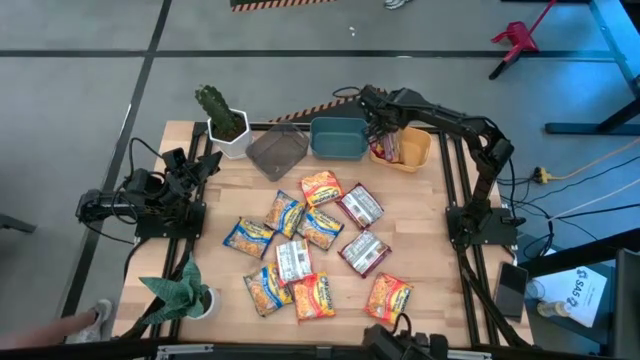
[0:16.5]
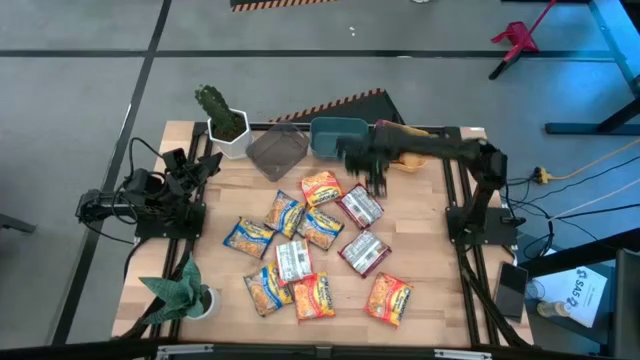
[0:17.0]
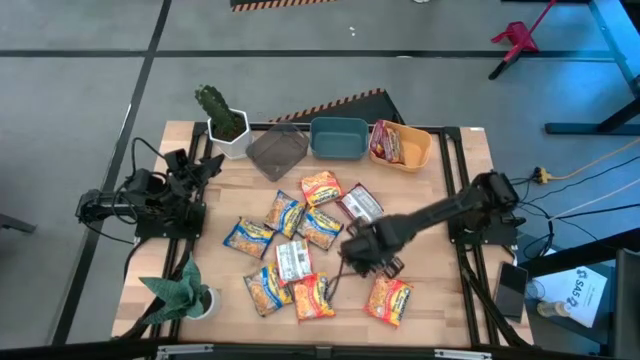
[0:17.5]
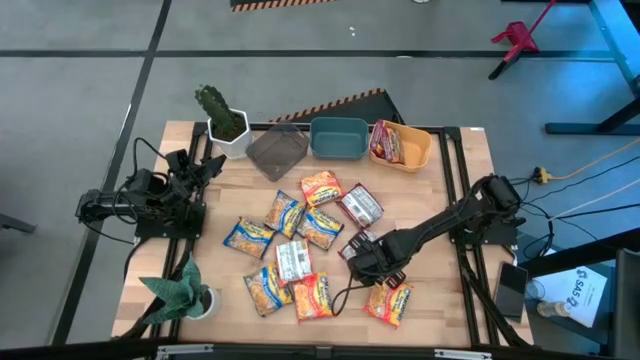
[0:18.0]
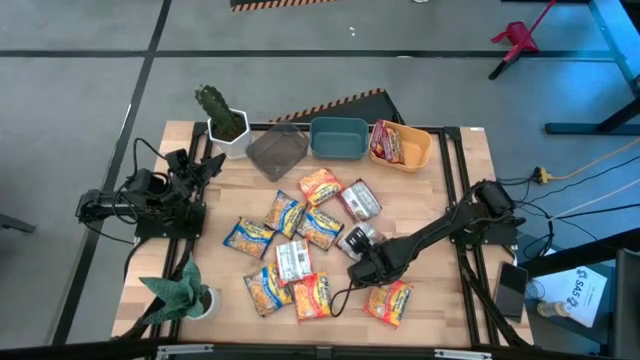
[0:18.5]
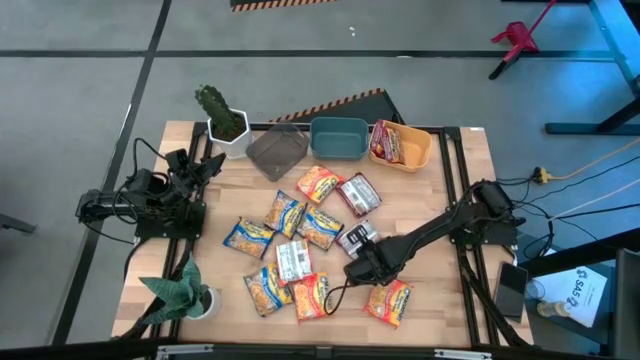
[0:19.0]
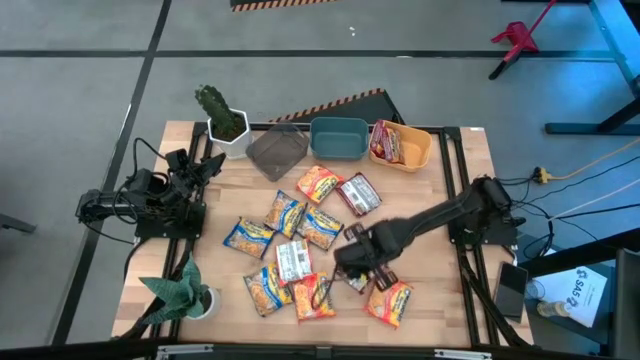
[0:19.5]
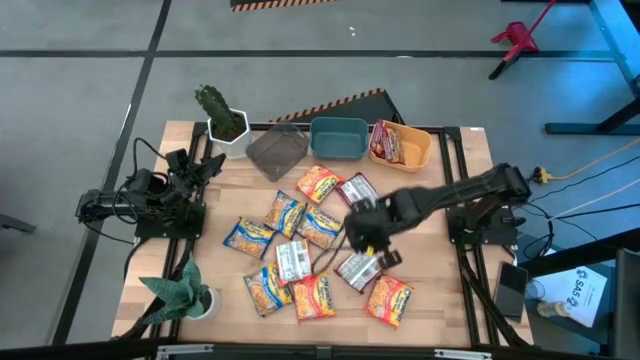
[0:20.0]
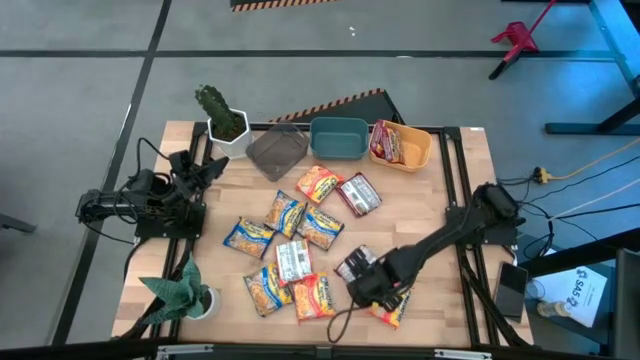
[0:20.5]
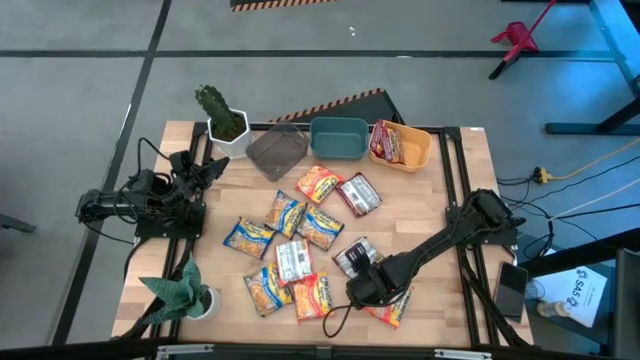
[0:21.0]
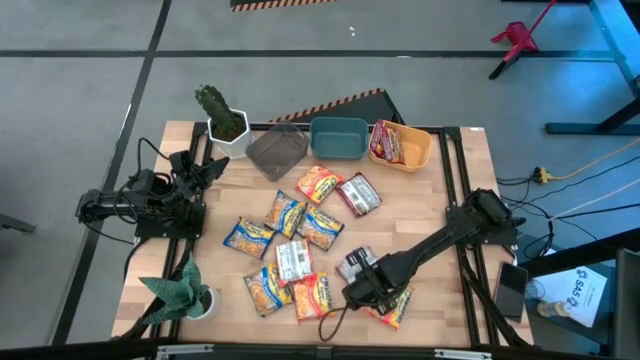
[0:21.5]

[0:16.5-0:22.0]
Task: Sort Maruchan noodles
Put the bottom red noodle pack into the orange bin

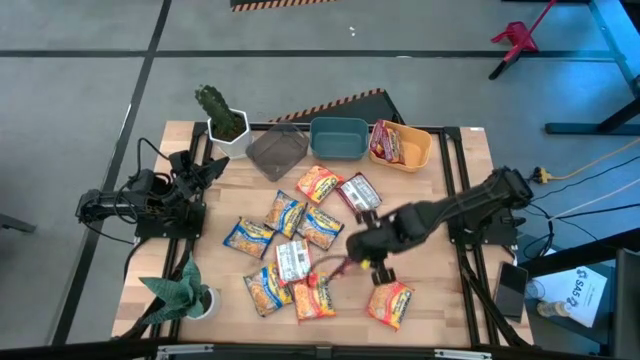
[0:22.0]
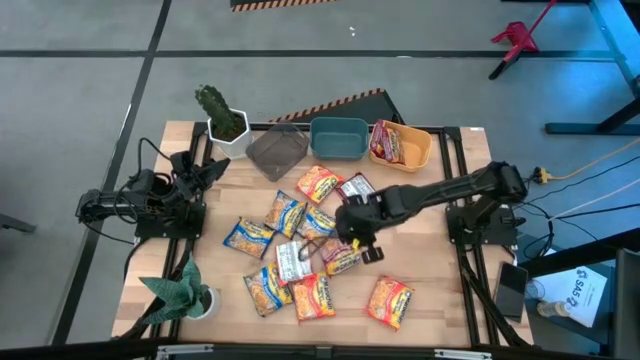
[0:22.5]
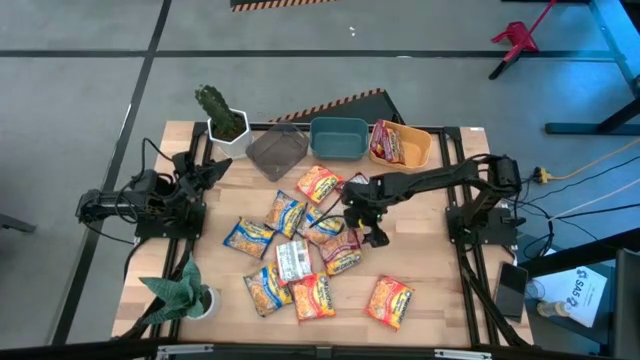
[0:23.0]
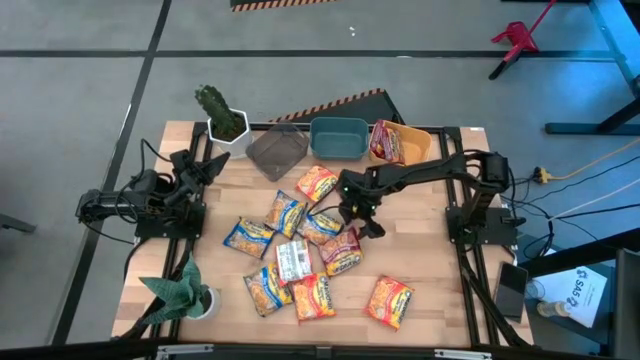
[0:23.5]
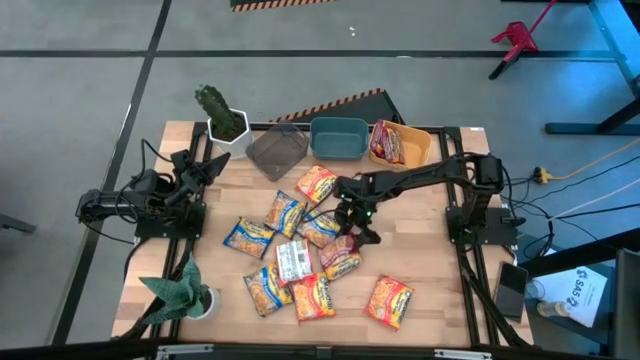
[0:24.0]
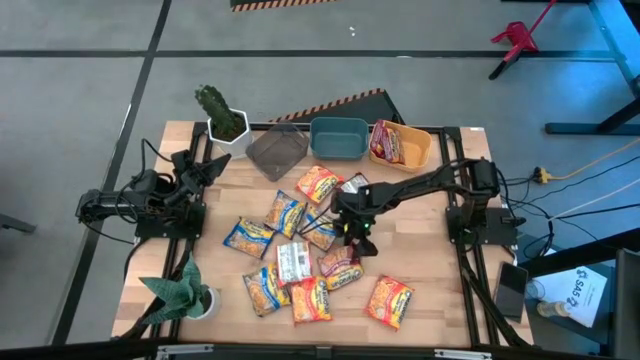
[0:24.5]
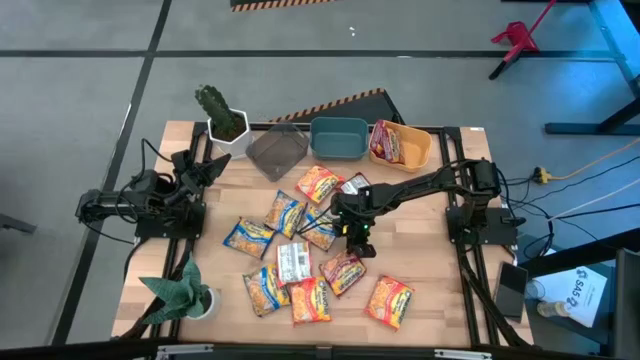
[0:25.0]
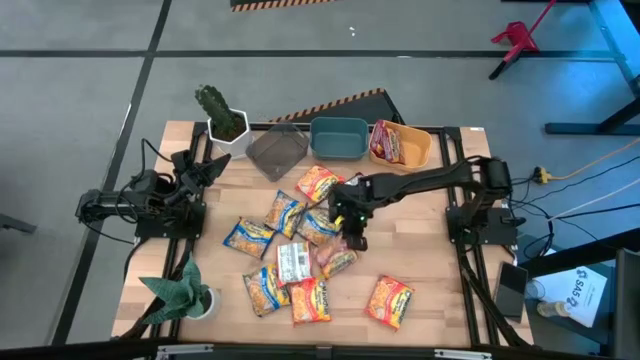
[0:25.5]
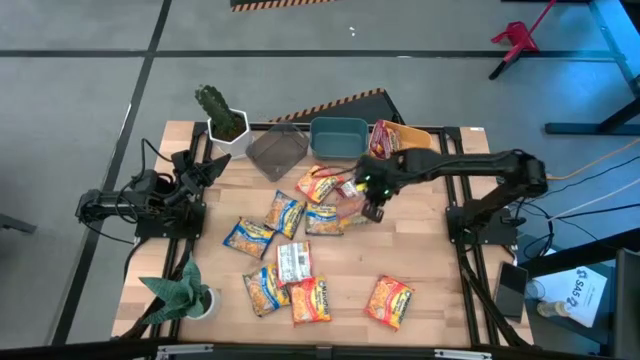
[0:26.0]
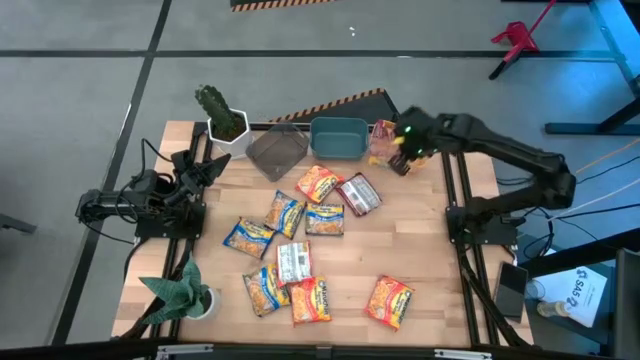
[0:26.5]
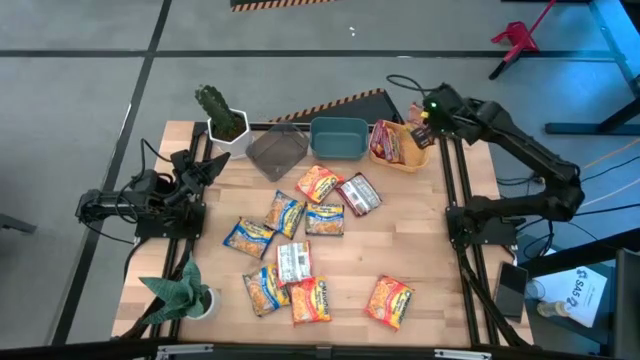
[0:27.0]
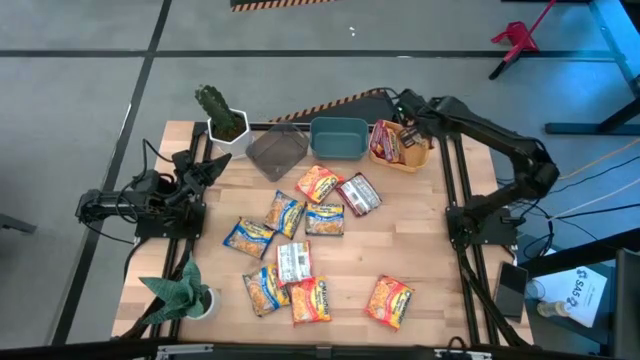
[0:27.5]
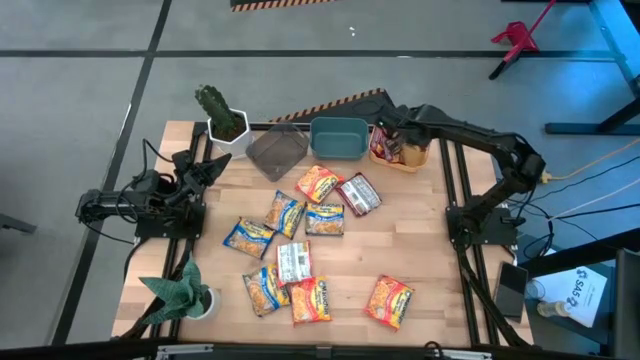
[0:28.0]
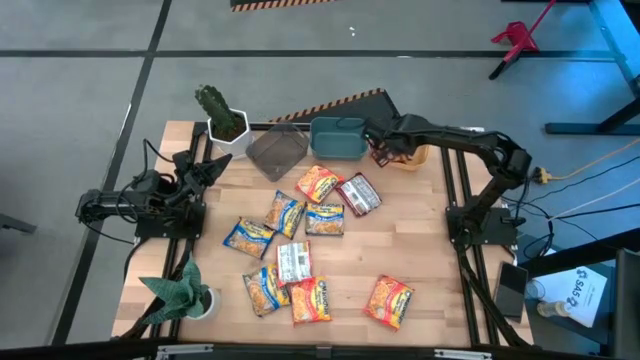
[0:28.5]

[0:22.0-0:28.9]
Put the bottom red noodle pack into the orange bin

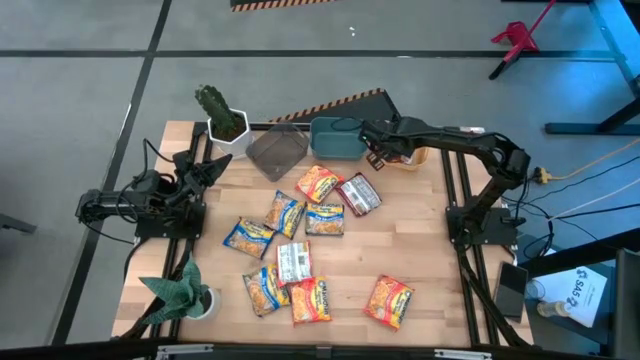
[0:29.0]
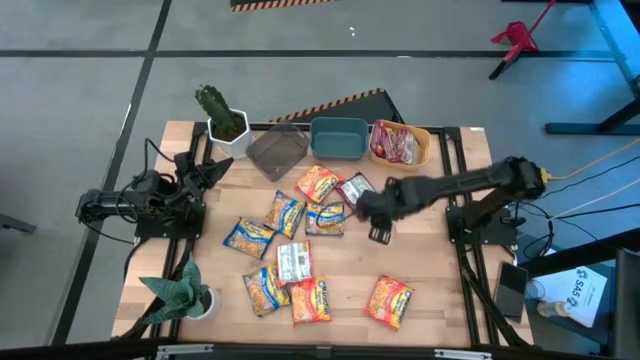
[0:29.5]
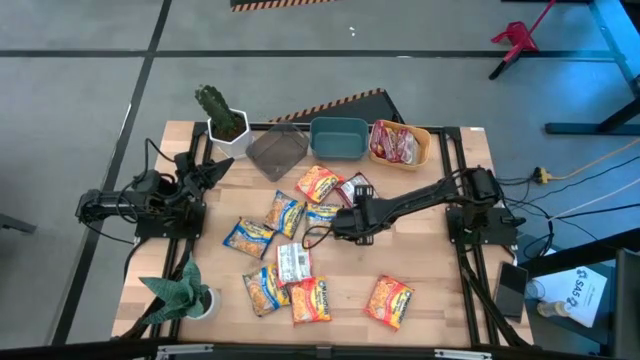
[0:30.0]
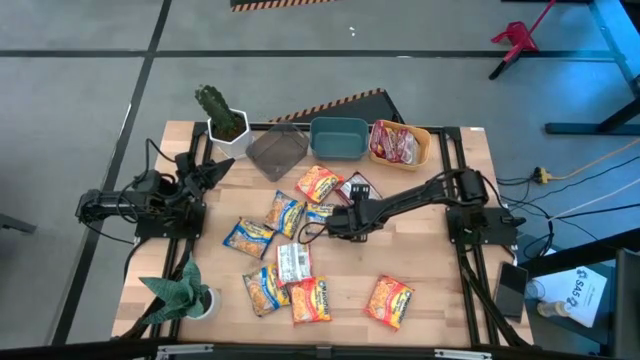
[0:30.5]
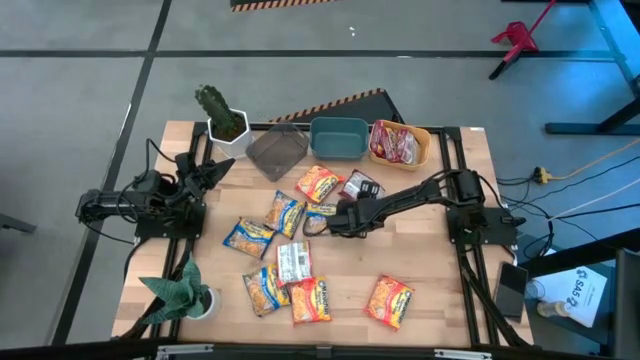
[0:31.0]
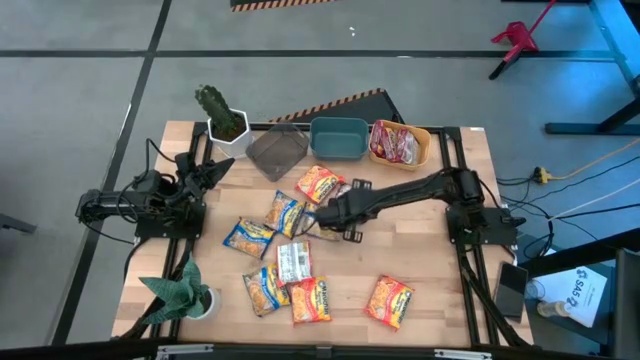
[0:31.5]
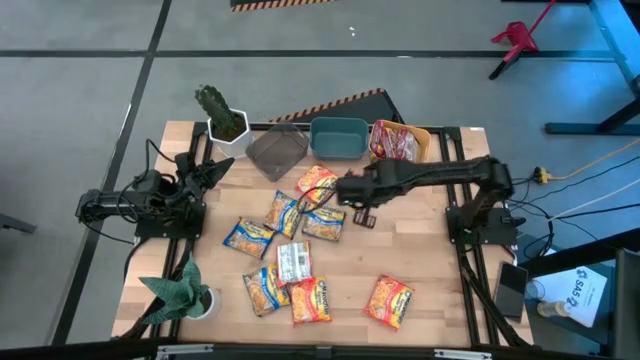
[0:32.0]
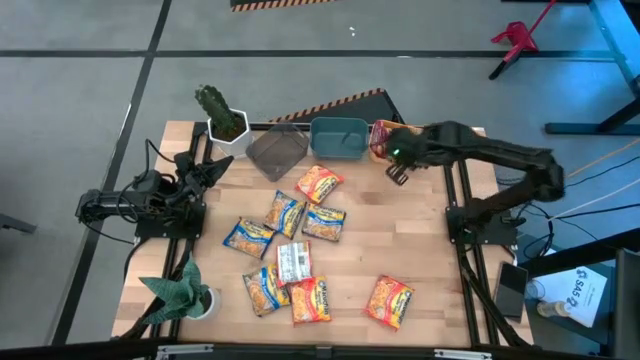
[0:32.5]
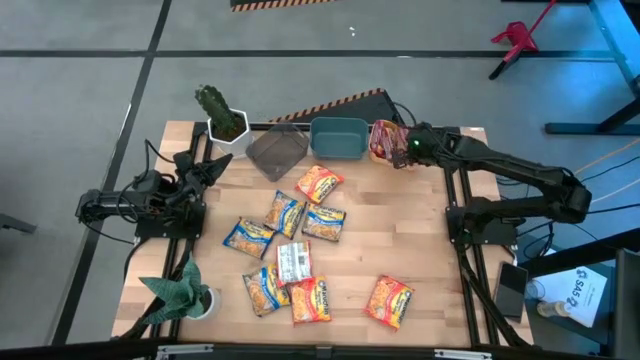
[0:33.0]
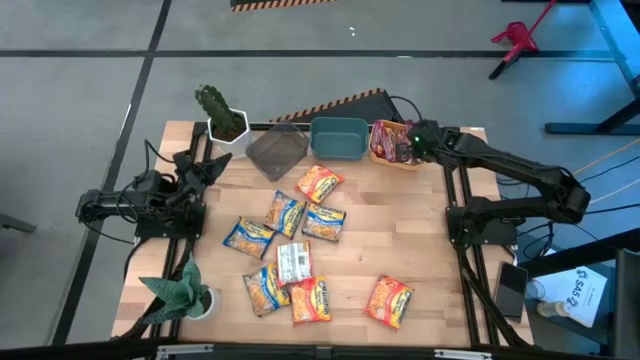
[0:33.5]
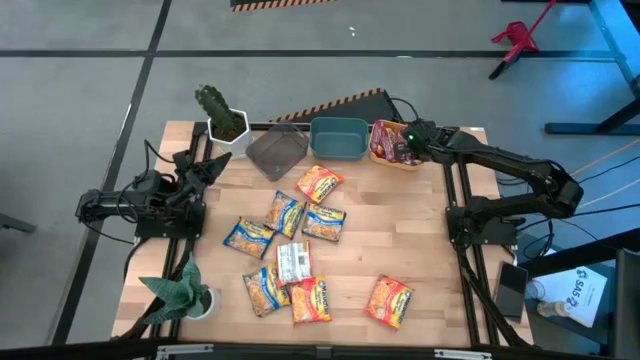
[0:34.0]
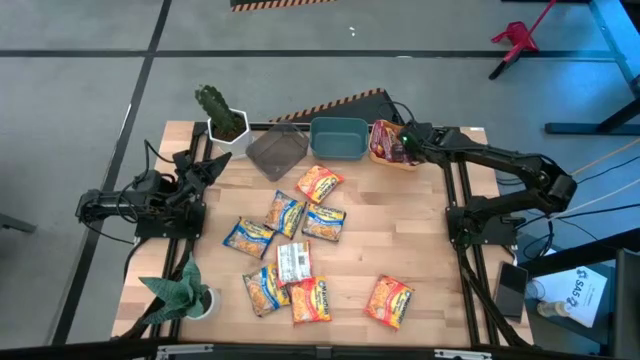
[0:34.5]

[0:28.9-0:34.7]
Put the red noodle pack into the orange bin

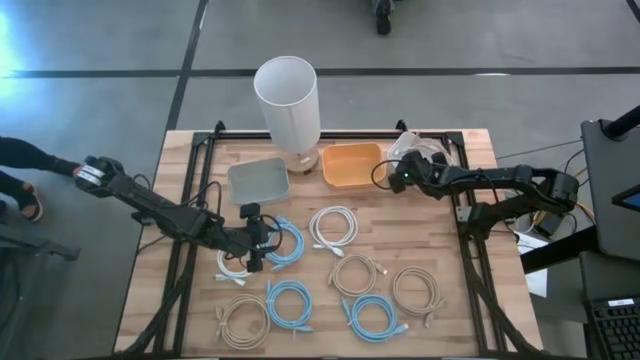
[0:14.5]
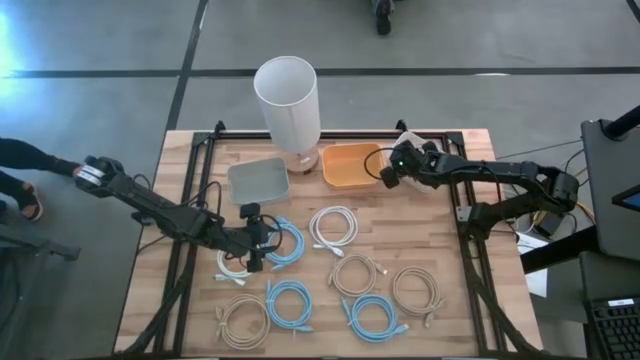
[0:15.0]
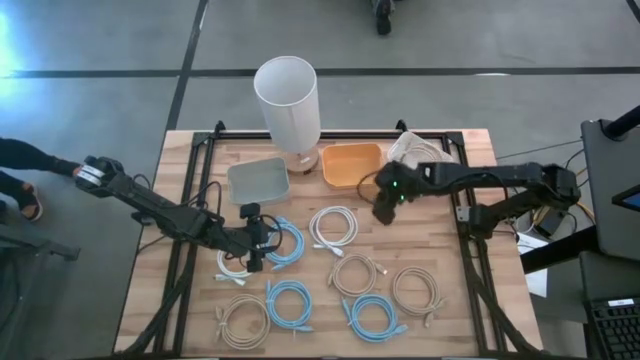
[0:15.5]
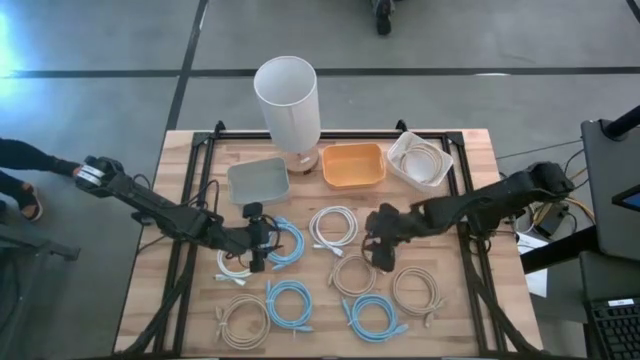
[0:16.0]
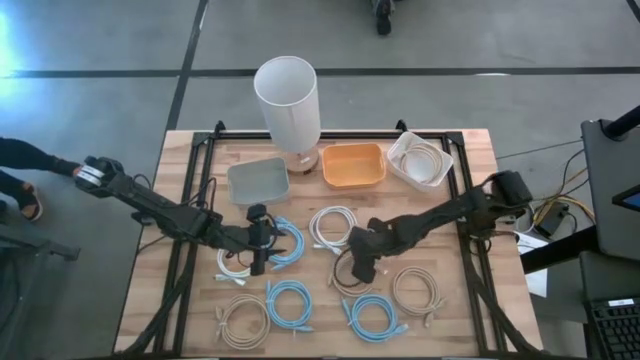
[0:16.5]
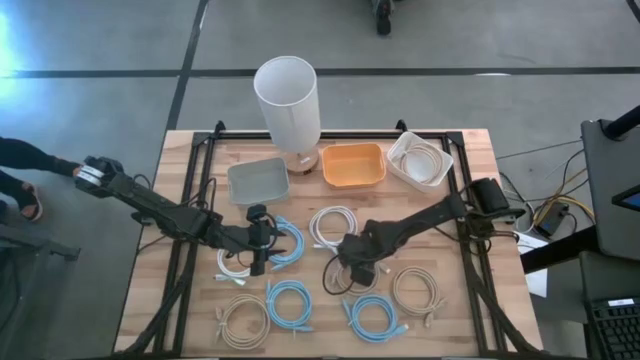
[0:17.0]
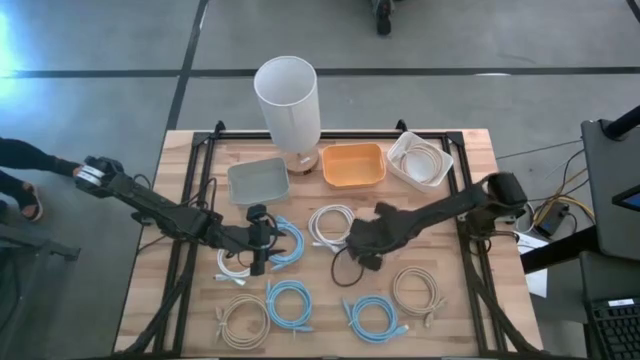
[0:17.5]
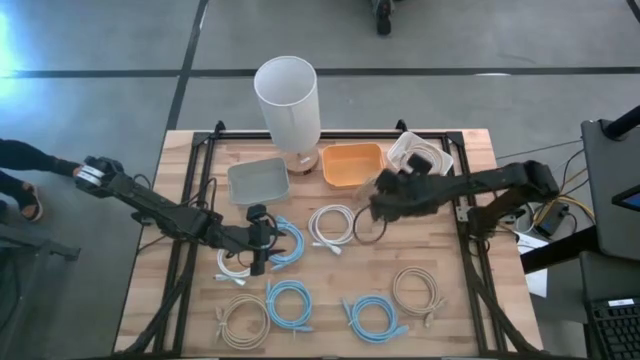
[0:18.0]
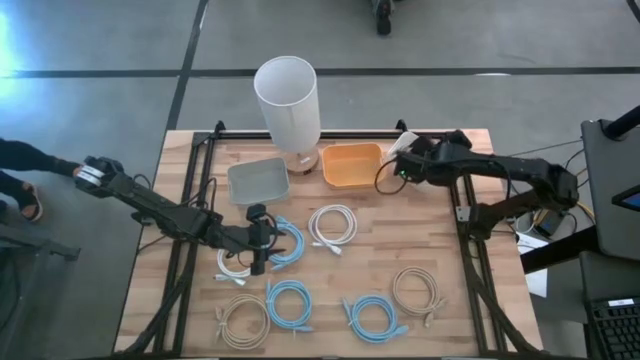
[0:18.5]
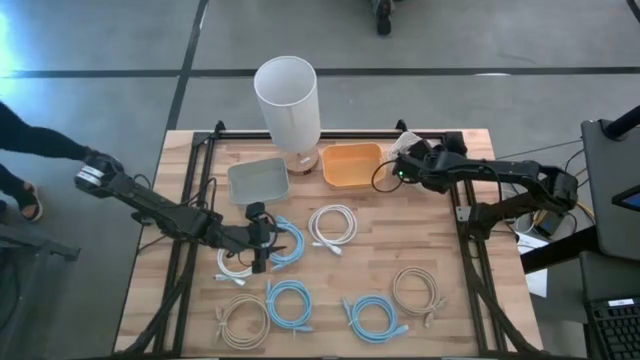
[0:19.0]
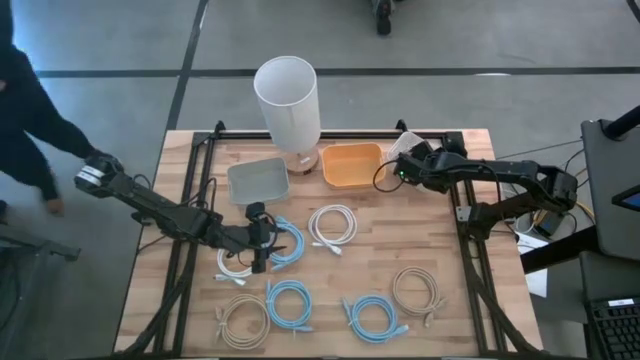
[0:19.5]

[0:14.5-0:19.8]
Task: Sort HDMI cables
Put the brown HDMI cable into the white bin
